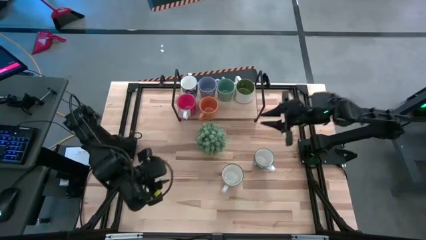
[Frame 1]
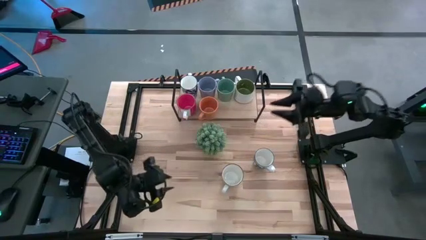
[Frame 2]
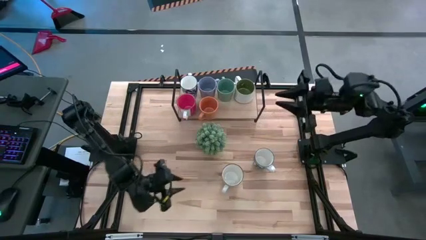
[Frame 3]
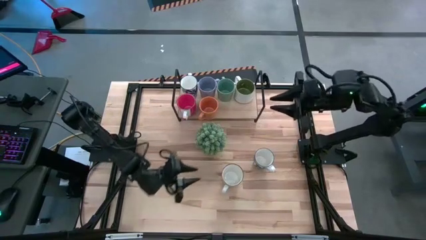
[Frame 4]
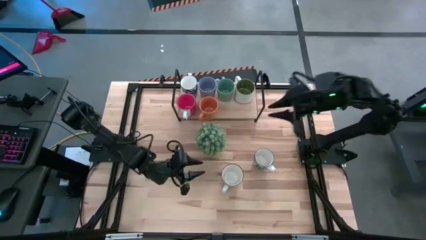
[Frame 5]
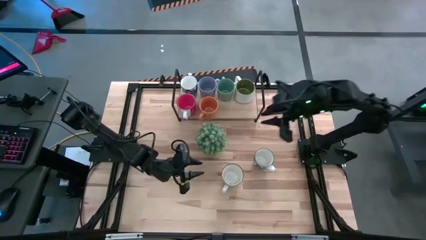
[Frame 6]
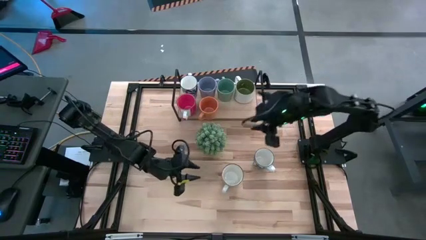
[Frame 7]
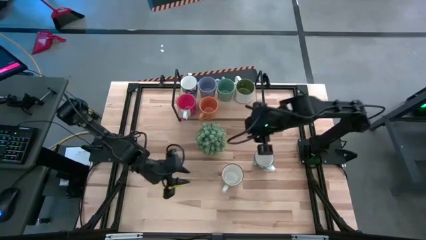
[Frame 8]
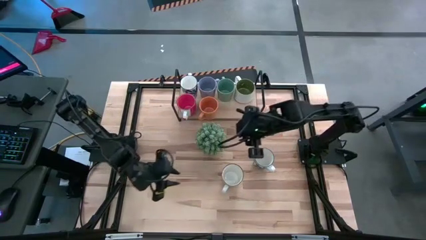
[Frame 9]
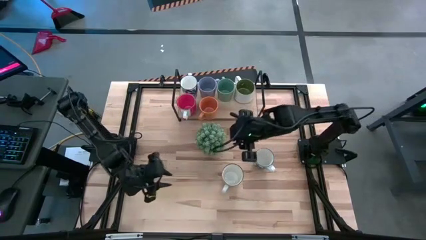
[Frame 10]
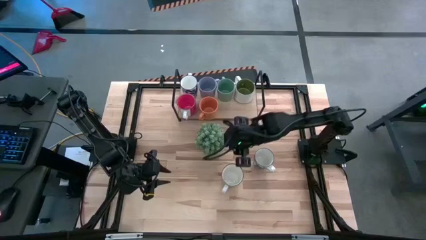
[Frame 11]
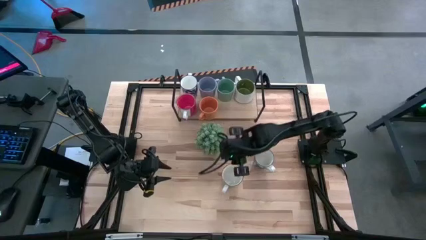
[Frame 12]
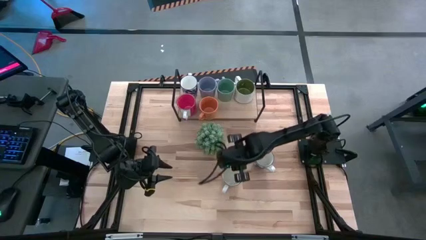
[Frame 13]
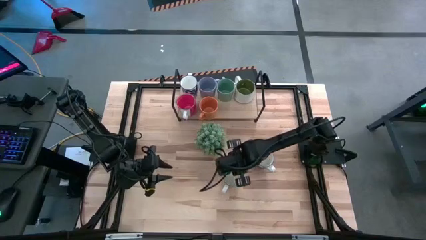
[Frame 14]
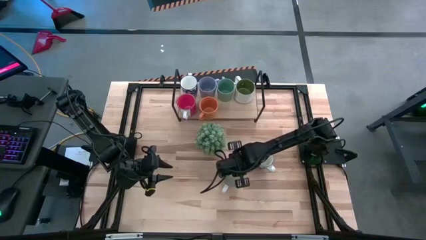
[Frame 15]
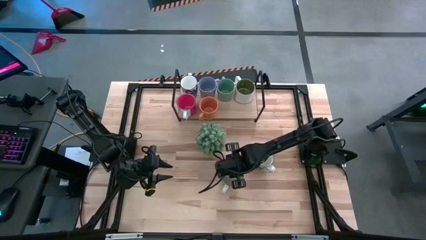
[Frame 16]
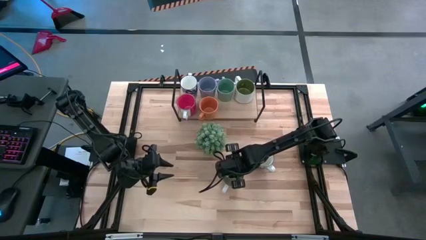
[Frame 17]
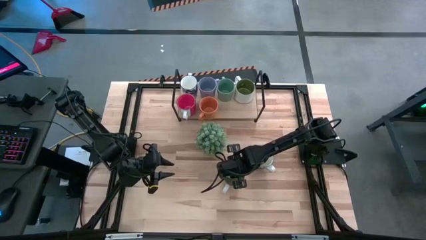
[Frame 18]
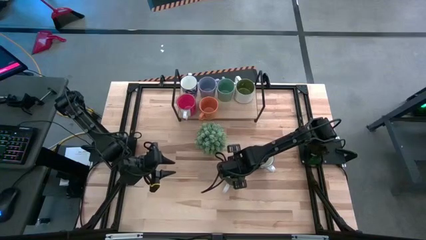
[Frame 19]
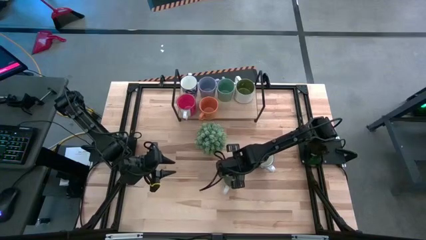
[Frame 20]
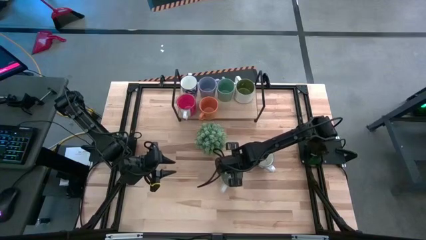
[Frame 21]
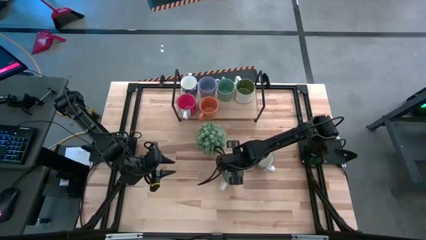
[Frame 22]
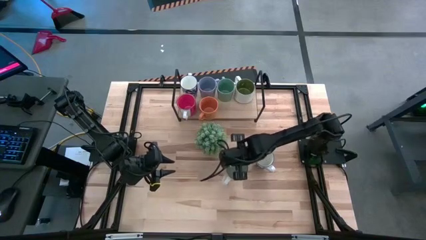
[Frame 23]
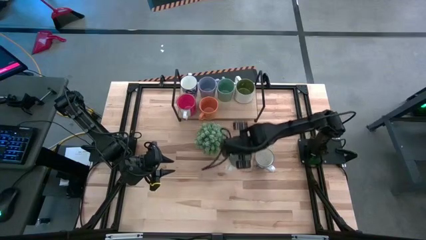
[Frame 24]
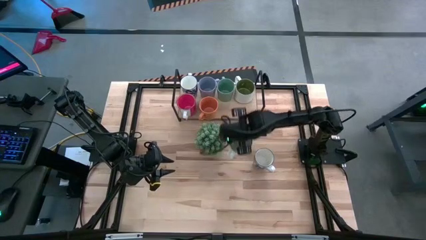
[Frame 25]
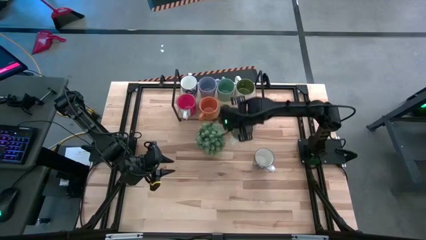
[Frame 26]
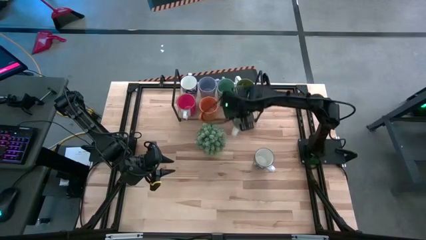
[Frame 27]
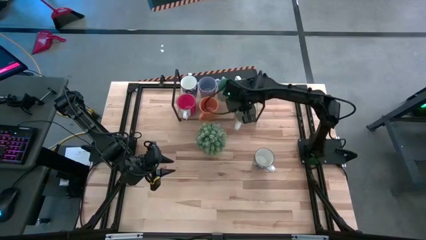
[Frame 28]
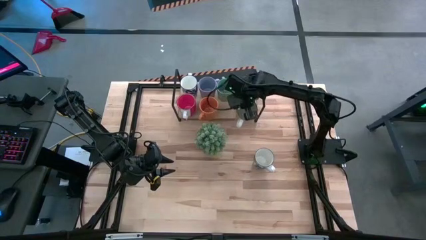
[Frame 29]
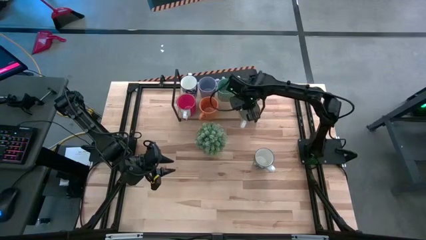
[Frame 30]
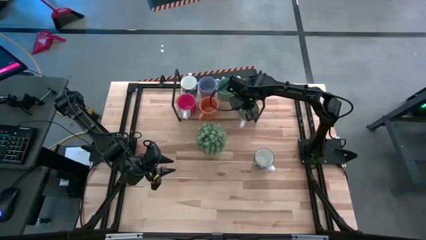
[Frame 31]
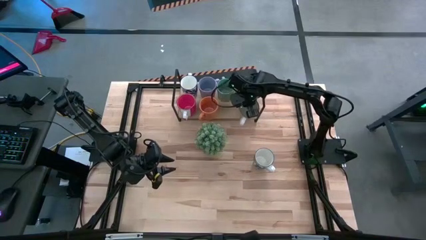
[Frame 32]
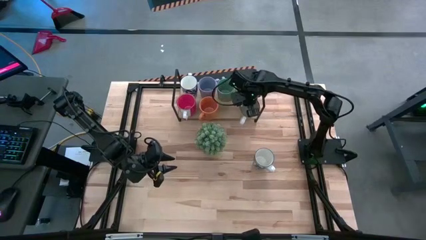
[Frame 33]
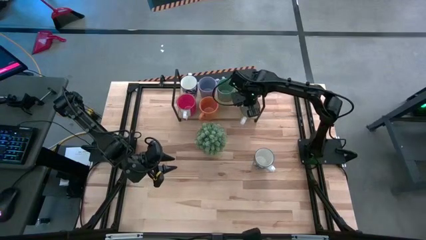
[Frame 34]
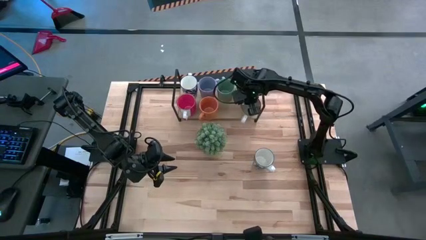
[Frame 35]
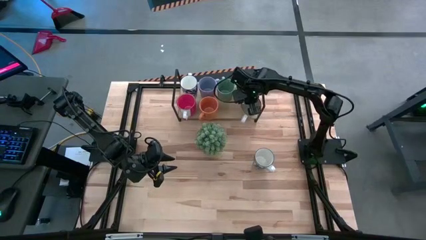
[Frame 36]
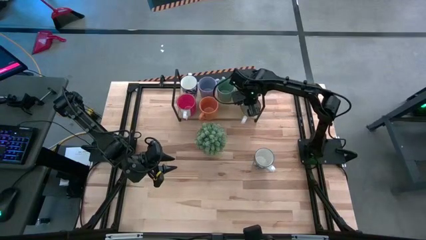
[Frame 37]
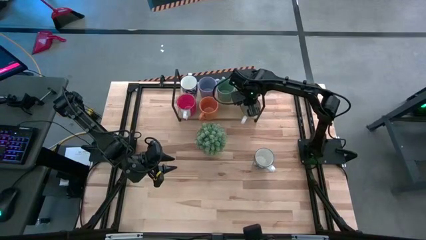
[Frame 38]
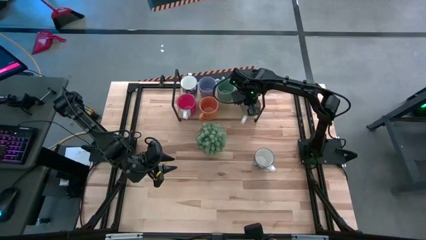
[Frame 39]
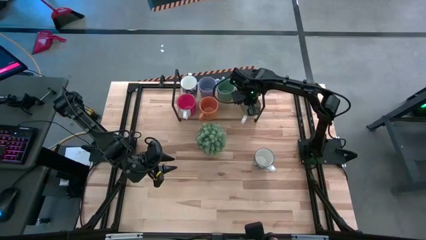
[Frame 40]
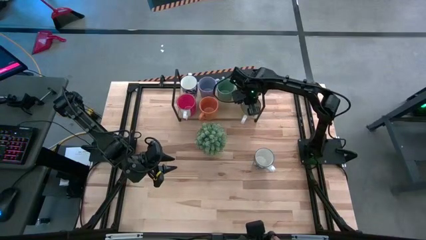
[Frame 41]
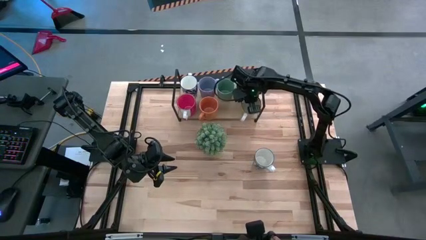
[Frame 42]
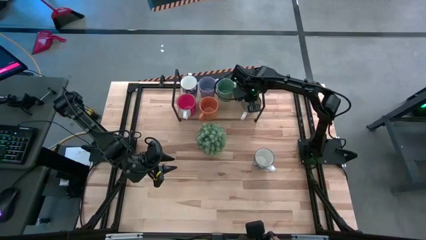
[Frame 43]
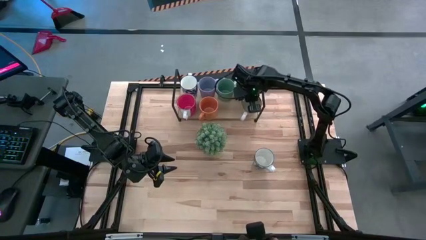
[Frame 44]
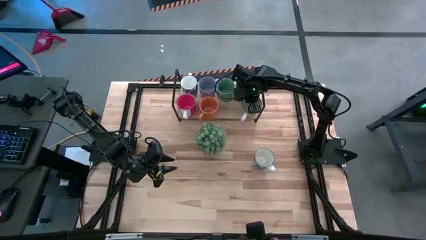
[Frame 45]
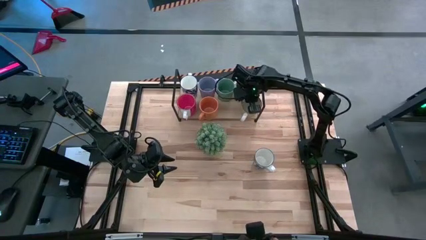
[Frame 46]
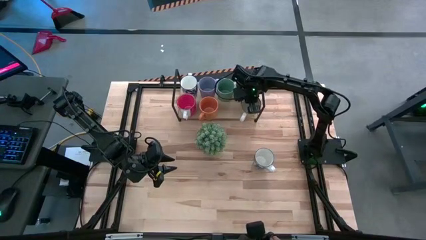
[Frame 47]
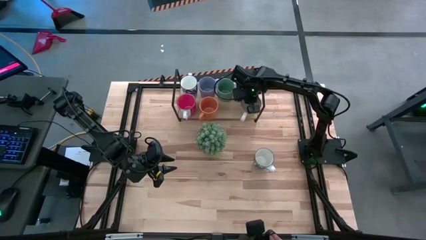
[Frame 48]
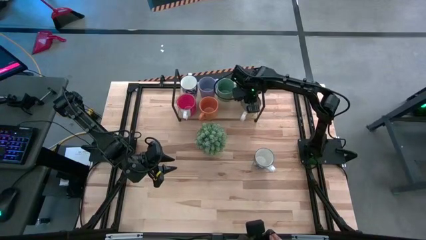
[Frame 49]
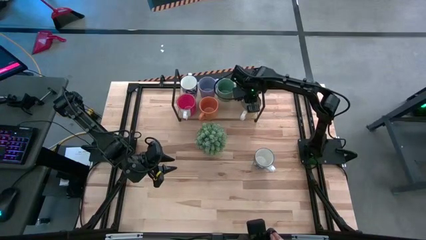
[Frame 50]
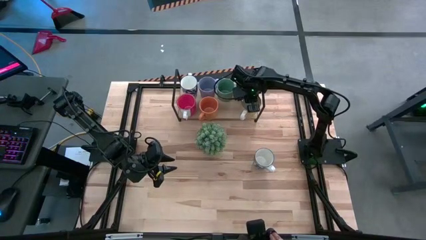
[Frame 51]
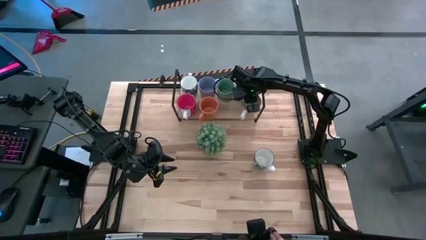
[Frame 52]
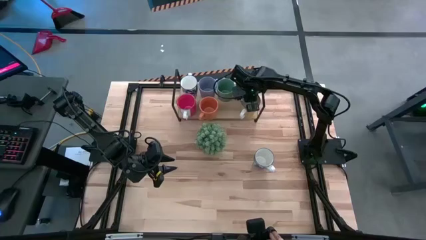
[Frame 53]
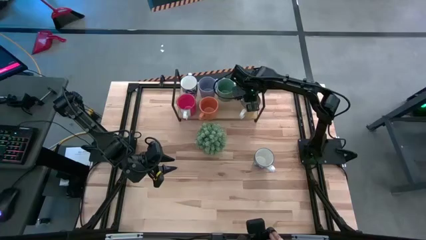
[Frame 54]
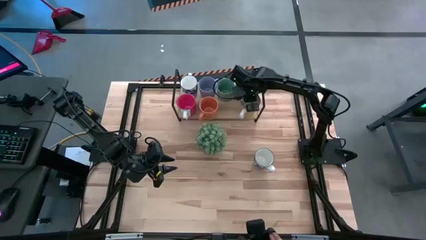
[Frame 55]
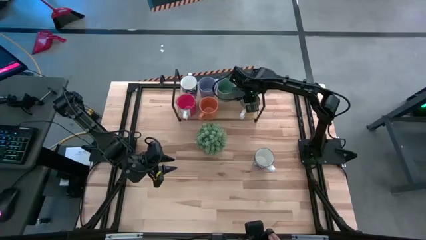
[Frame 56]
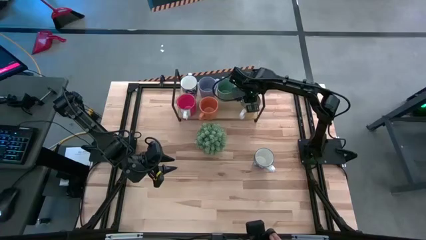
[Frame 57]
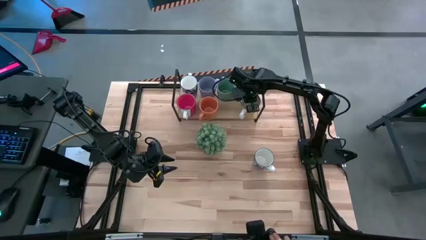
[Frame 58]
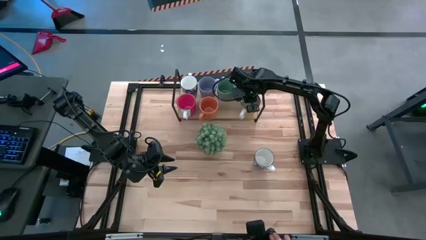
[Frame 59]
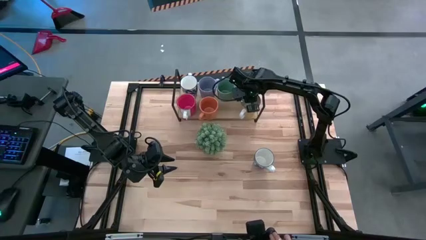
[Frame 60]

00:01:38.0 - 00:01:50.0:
Task: Place coffee mugs
Put the yellow mug on the shelf
